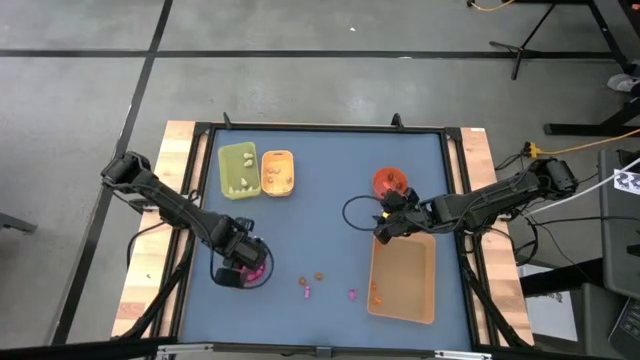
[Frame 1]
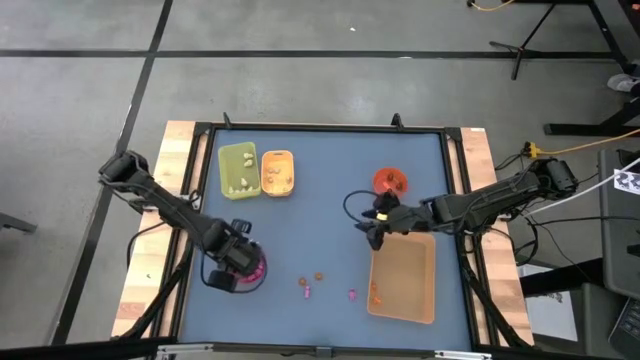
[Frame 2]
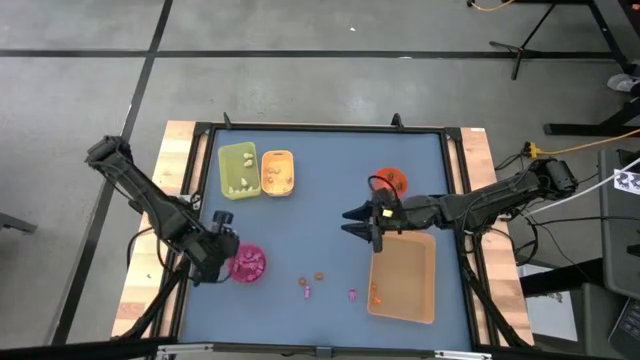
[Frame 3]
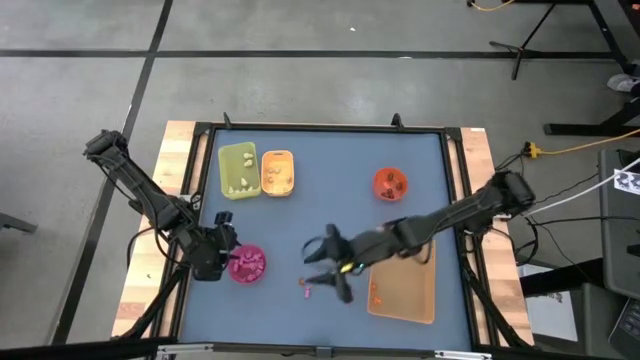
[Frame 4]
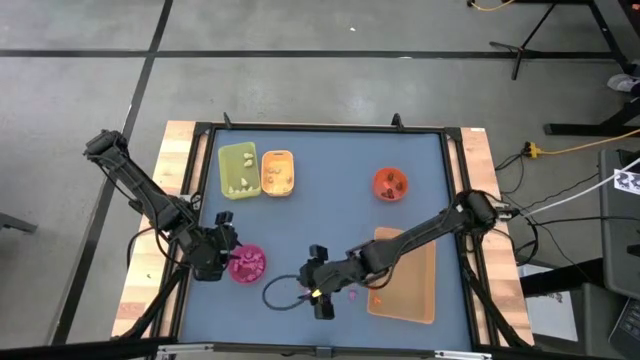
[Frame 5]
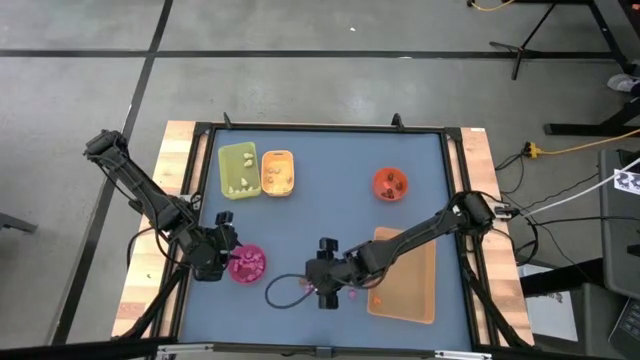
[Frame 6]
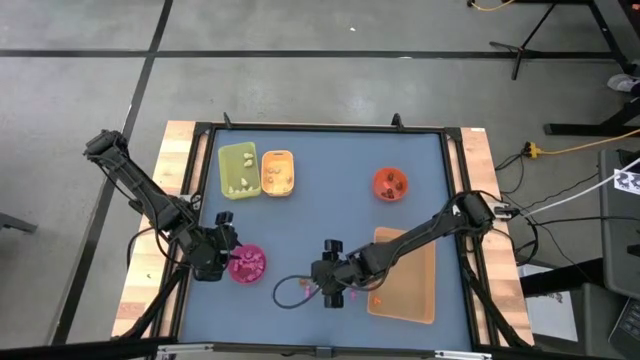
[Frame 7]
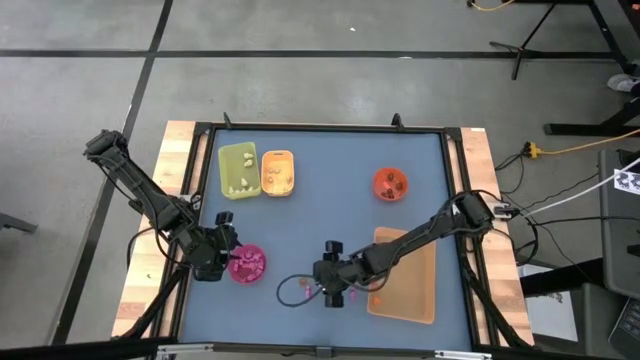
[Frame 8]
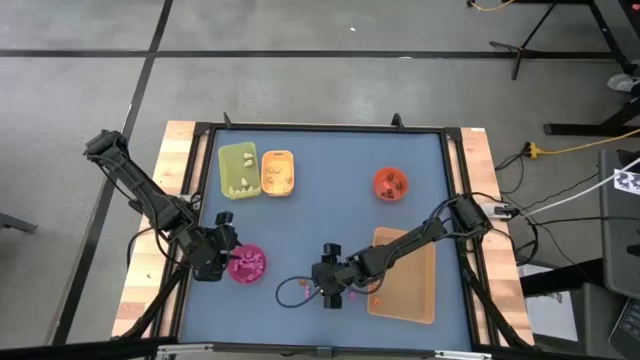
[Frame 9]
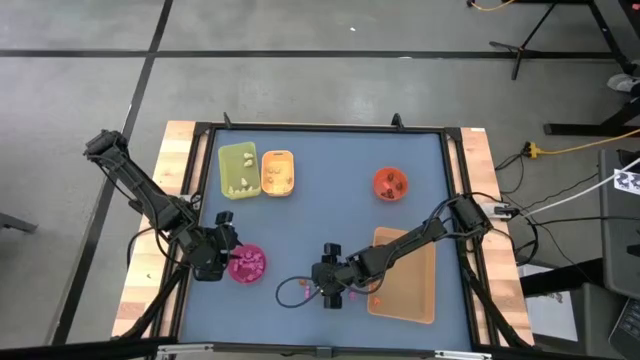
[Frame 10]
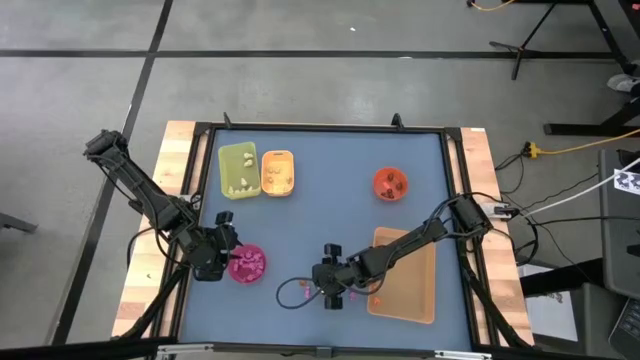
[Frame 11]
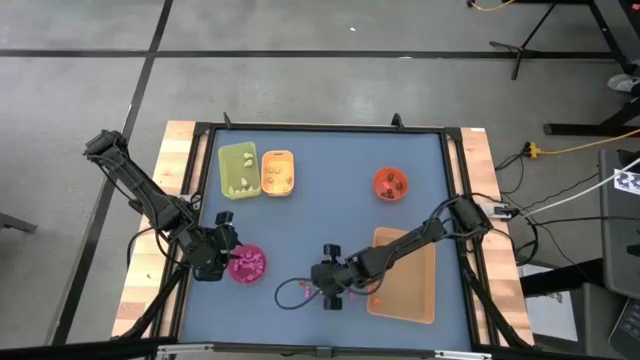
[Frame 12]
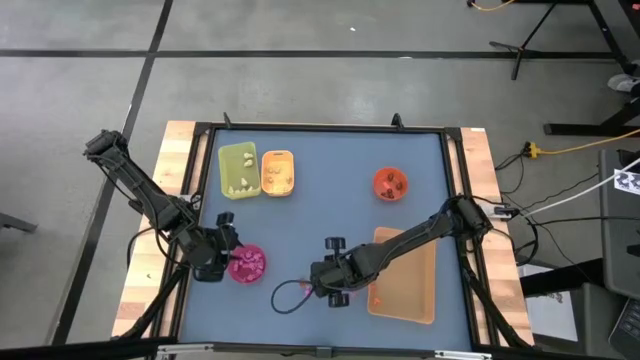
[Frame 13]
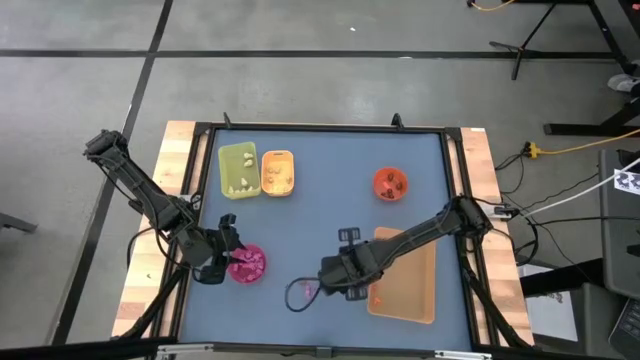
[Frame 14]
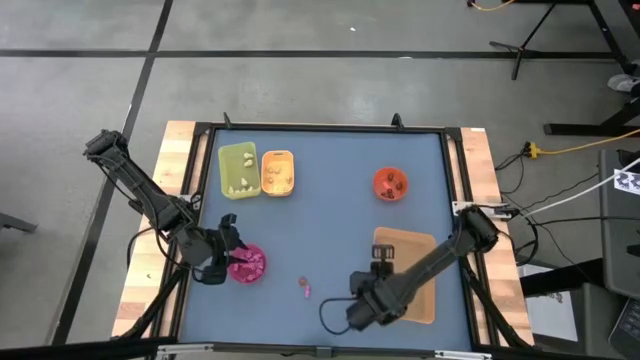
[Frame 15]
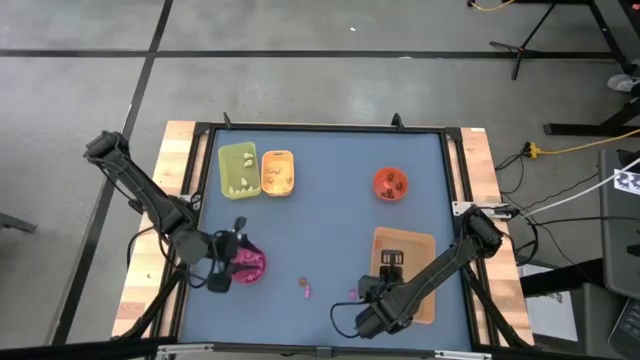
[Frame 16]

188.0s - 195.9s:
Task: Sort Halloween decoration
Put the orange pumpkin toy into the orange bin

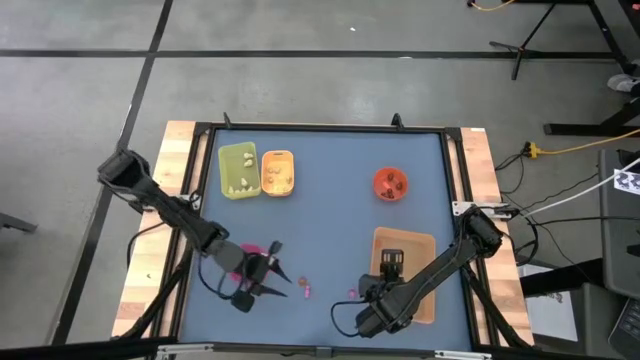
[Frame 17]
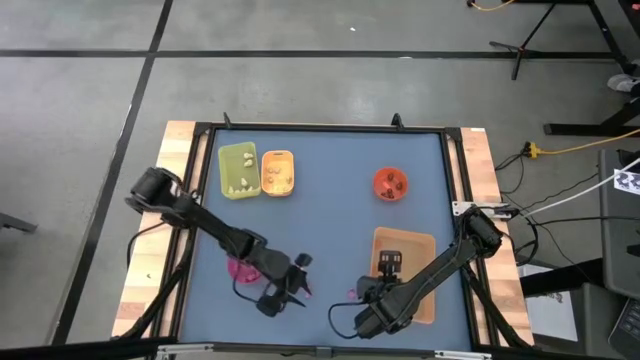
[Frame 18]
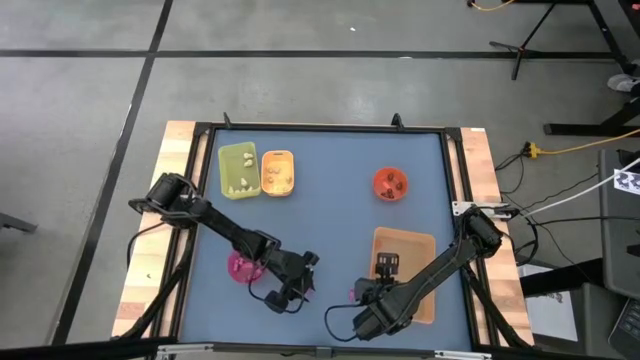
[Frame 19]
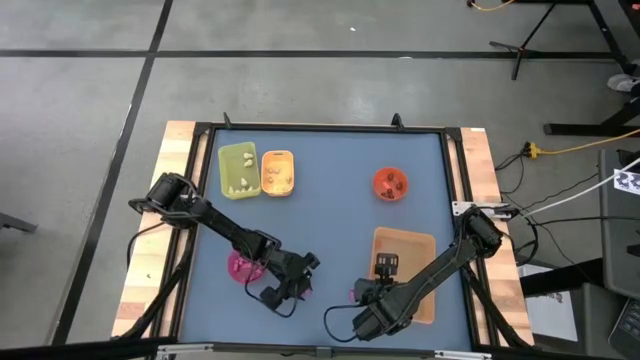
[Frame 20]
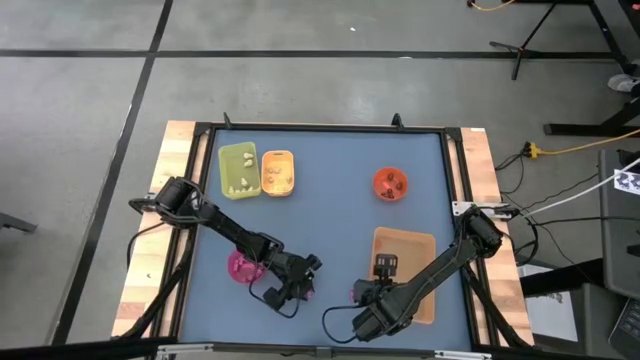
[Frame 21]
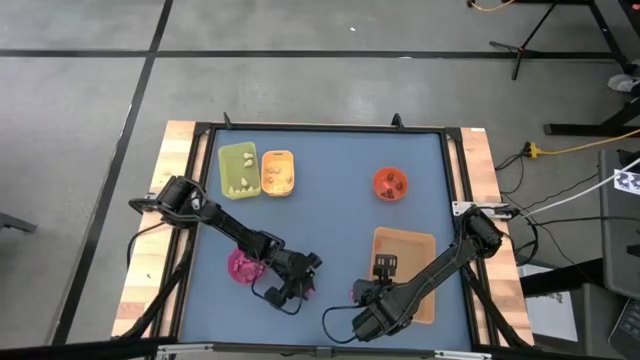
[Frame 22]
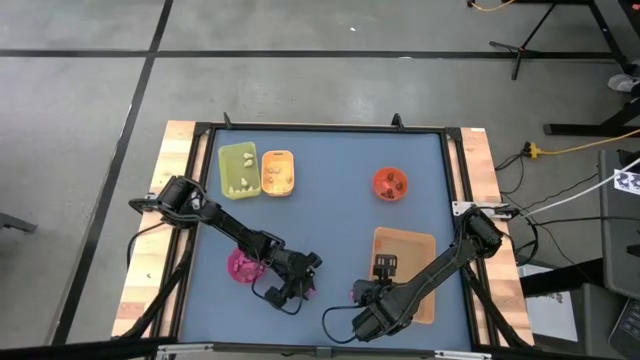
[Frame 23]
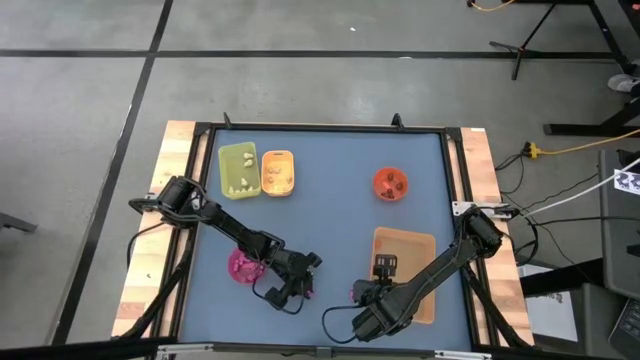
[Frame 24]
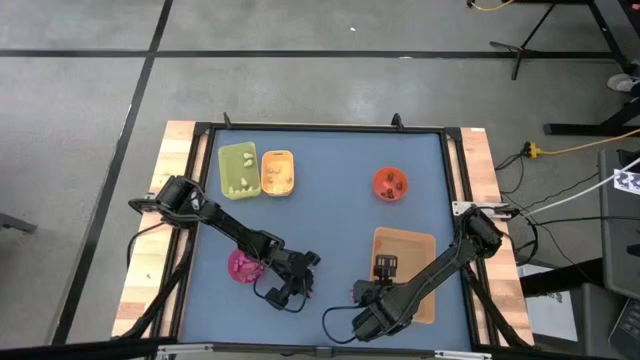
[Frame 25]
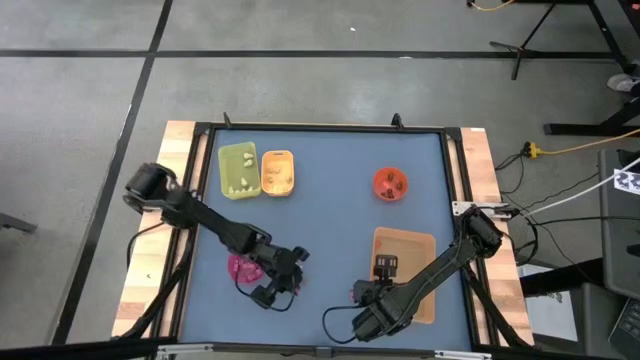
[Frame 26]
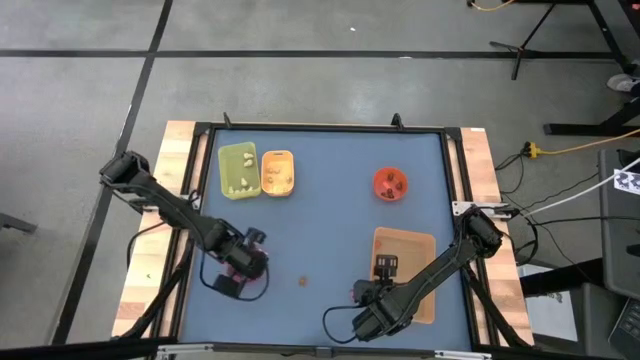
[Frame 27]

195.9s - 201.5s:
Put the pink skeleton toy into the red bowl

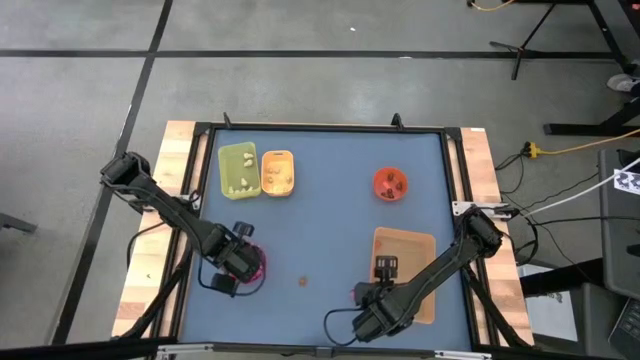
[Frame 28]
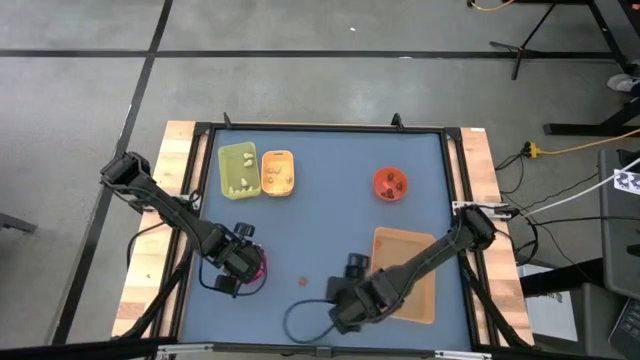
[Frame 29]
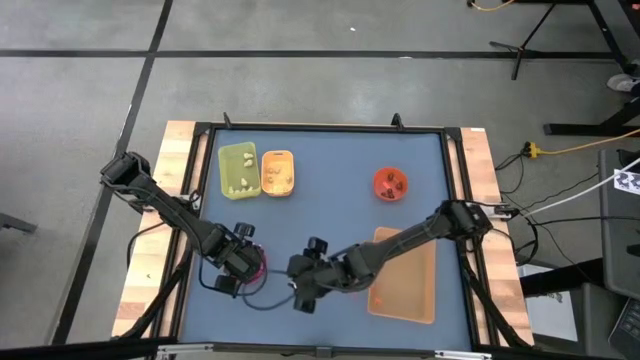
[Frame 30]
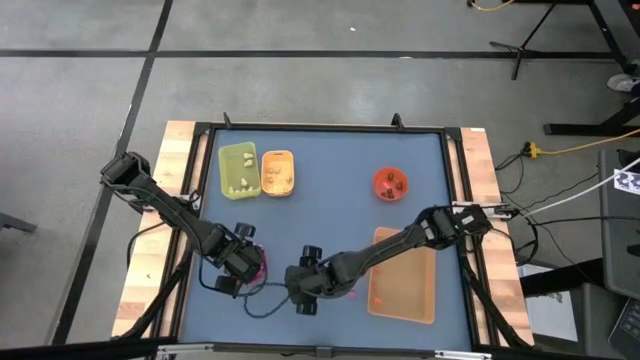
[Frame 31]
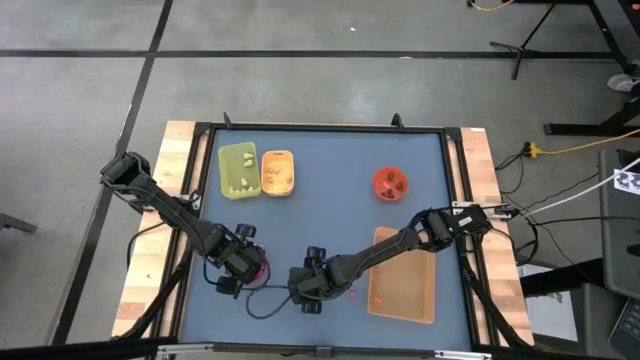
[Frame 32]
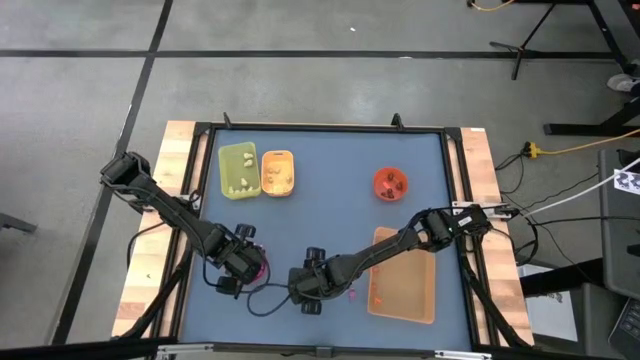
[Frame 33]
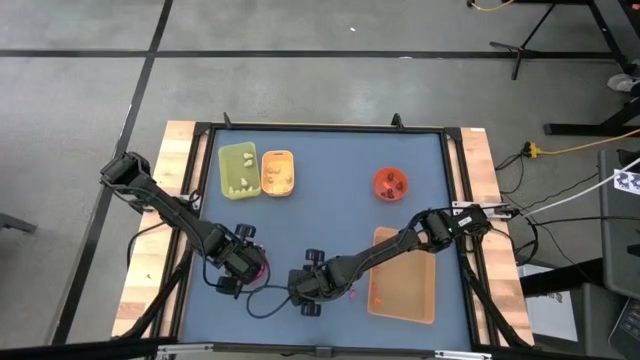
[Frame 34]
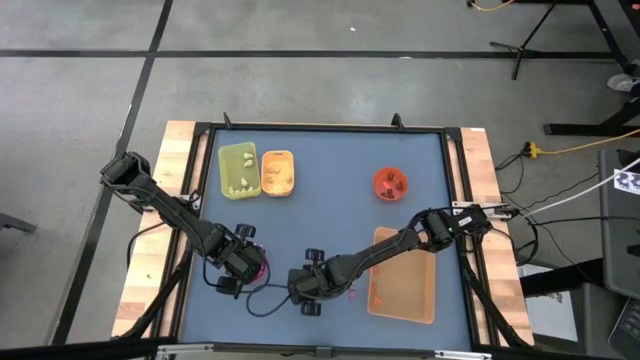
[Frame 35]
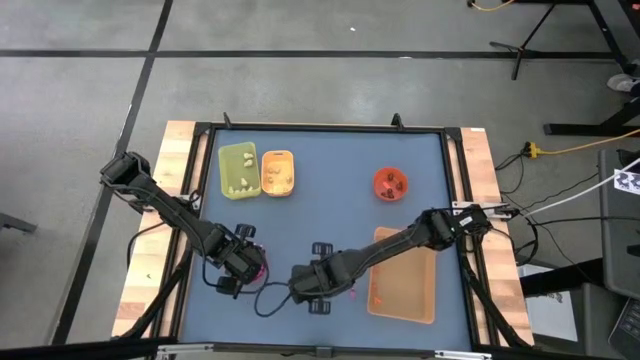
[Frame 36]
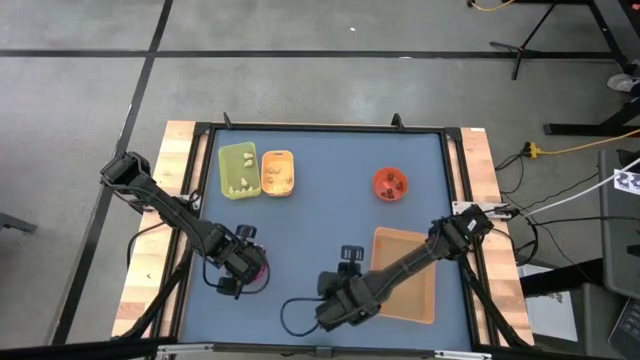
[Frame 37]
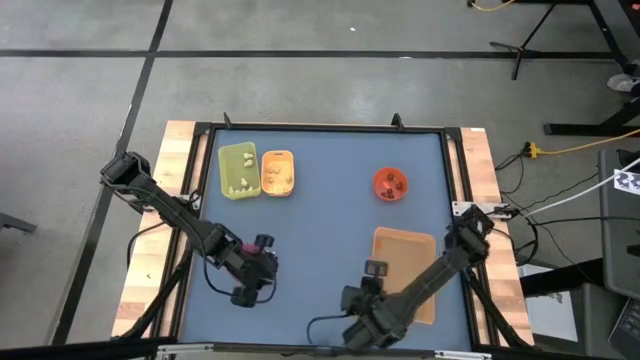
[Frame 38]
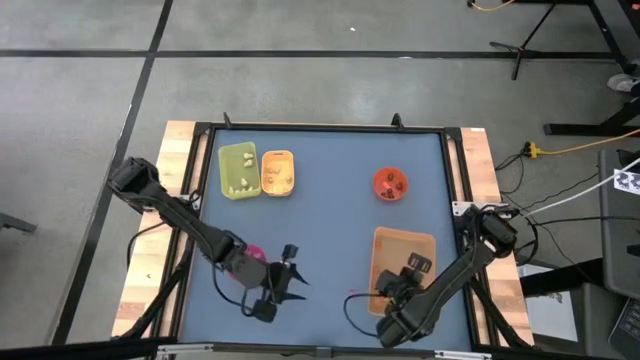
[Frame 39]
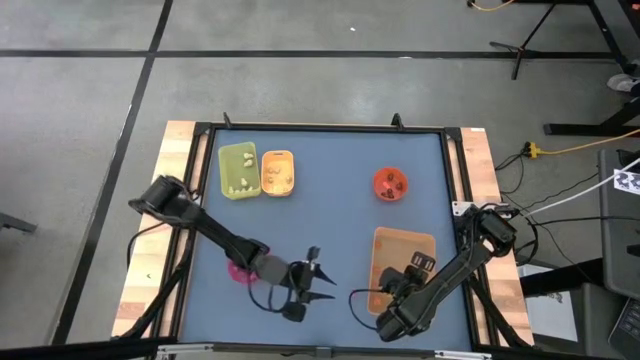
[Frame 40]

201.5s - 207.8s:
Put the orange pumpkin toy into the orange bin
